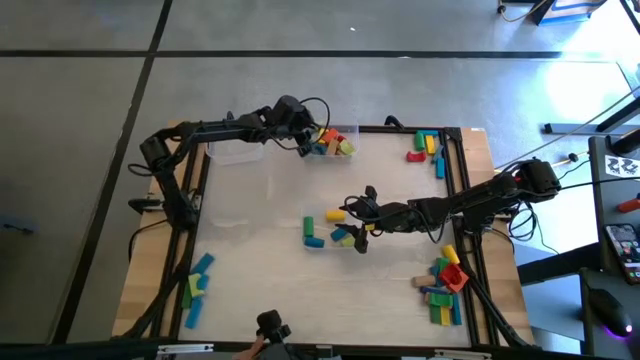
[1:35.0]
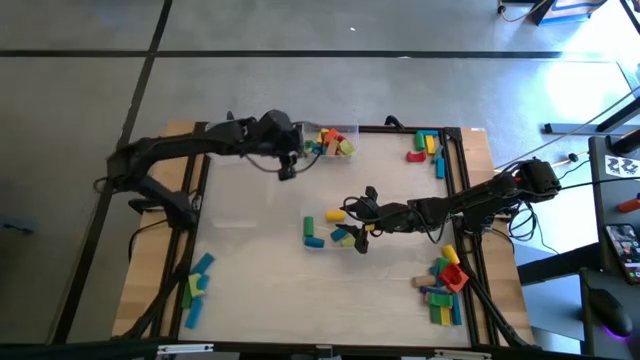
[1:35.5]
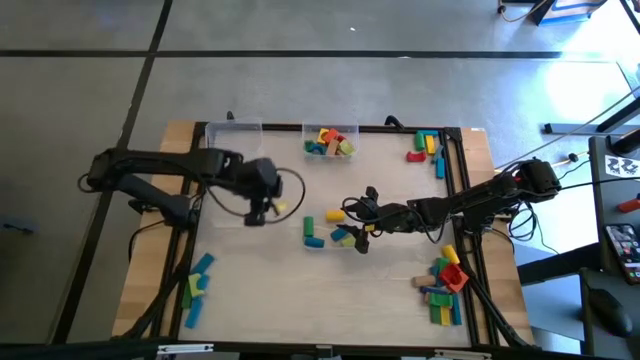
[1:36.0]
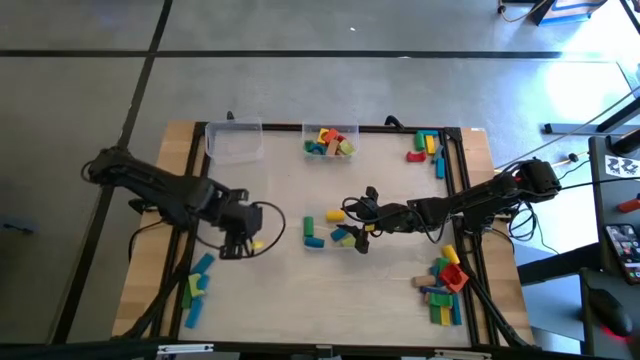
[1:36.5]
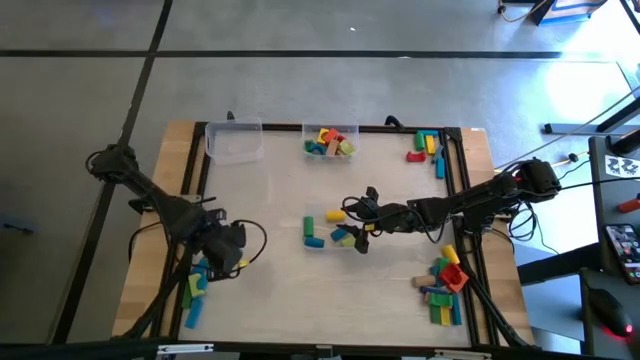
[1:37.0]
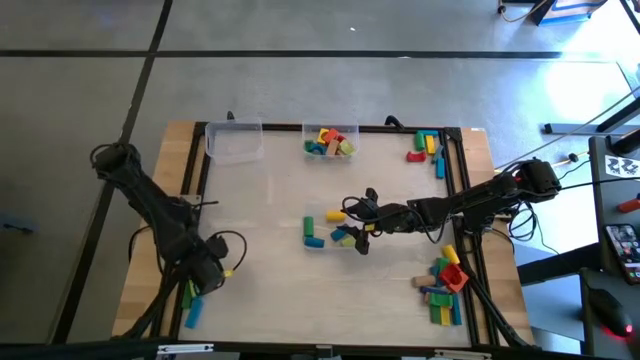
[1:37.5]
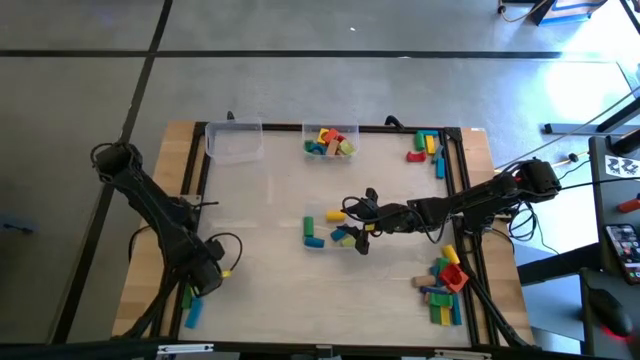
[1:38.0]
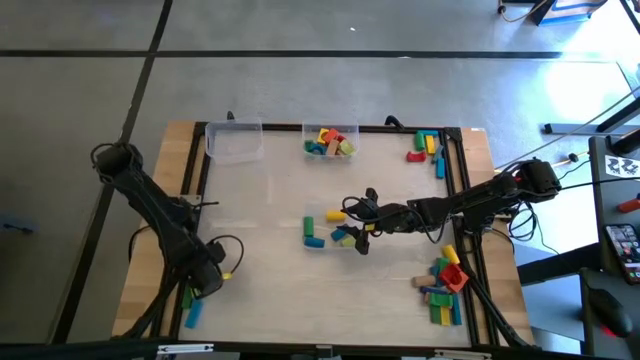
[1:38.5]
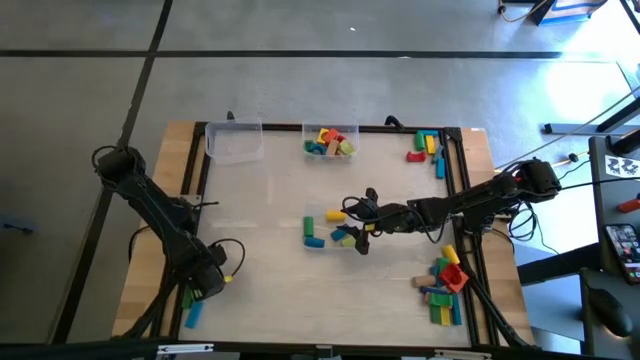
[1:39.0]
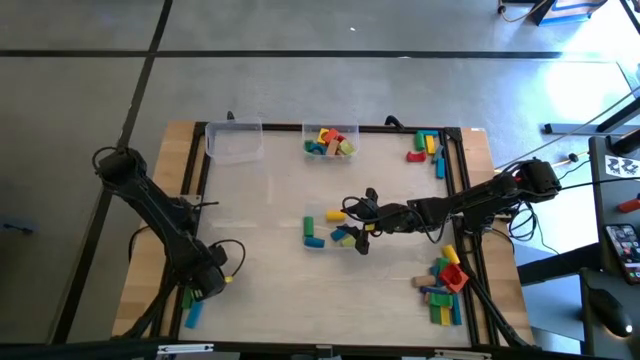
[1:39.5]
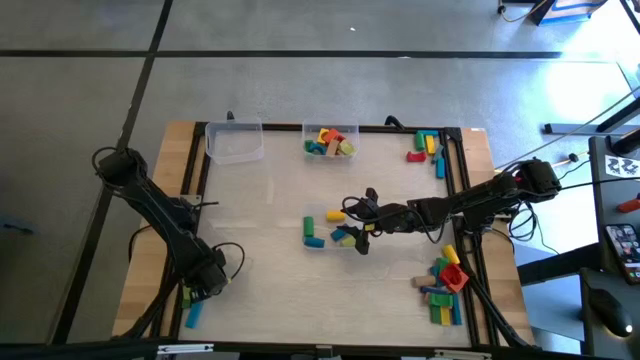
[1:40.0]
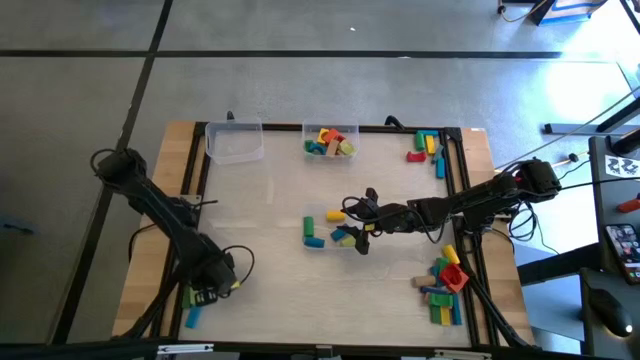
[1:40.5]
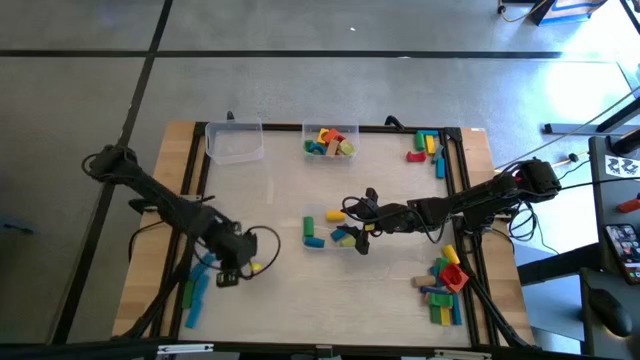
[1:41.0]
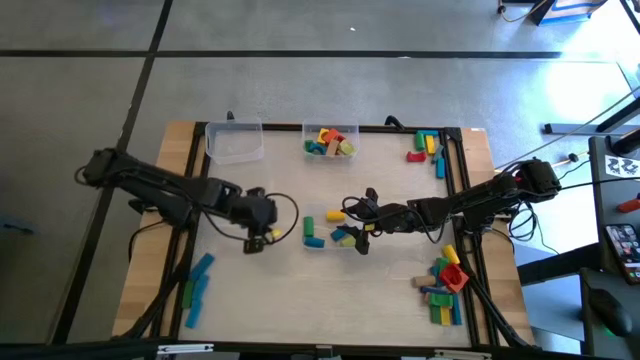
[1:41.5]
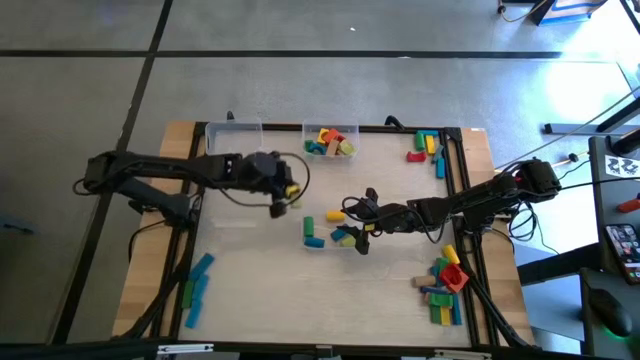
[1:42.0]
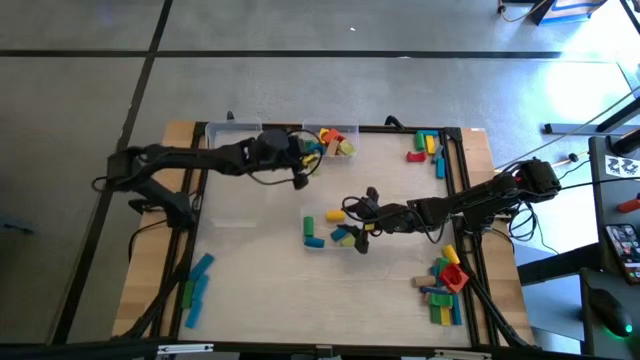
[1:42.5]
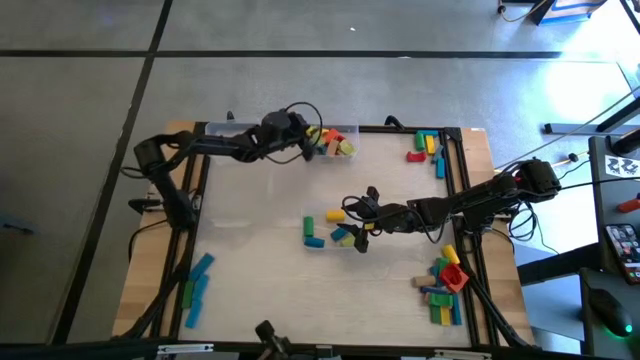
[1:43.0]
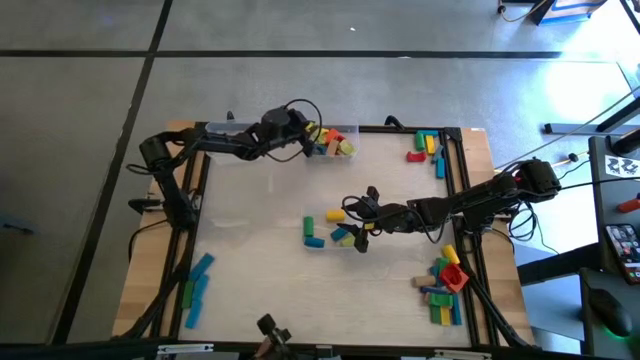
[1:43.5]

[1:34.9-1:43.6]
Task: Sort blocks by size
Put the light green arch block into the top right transparent bin

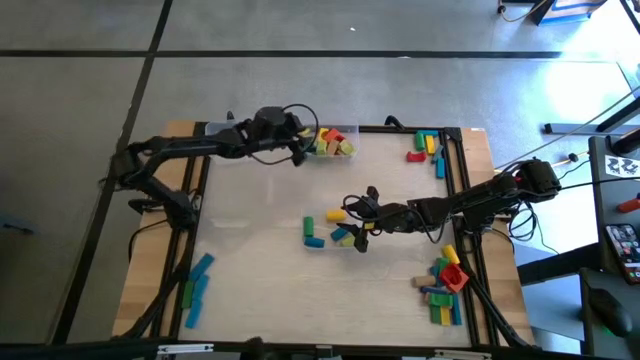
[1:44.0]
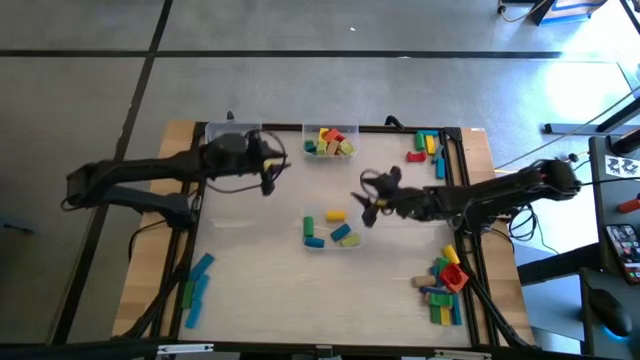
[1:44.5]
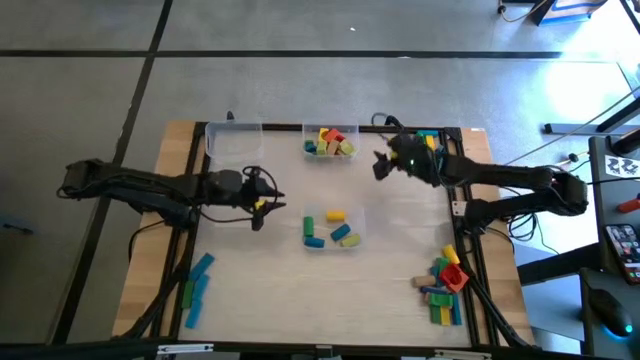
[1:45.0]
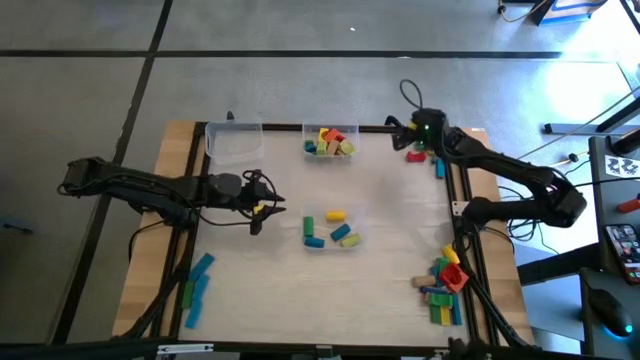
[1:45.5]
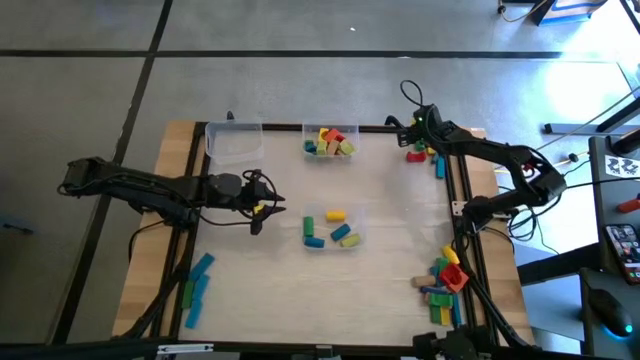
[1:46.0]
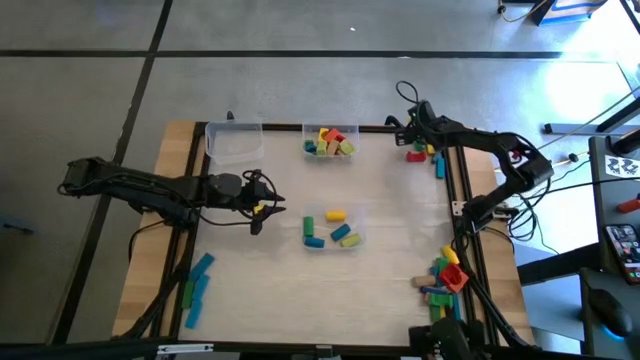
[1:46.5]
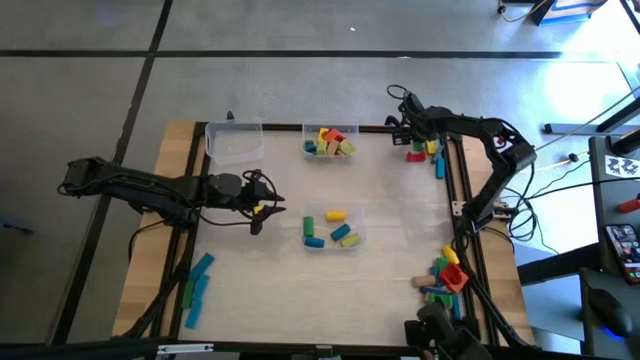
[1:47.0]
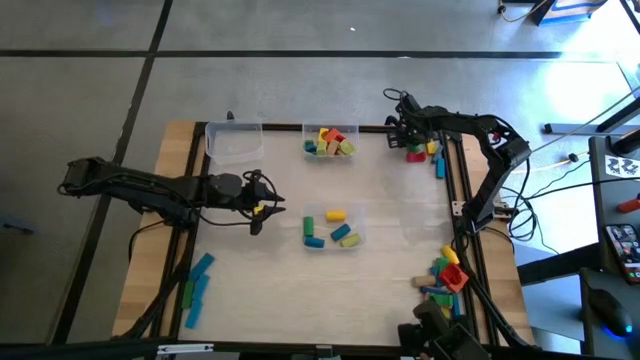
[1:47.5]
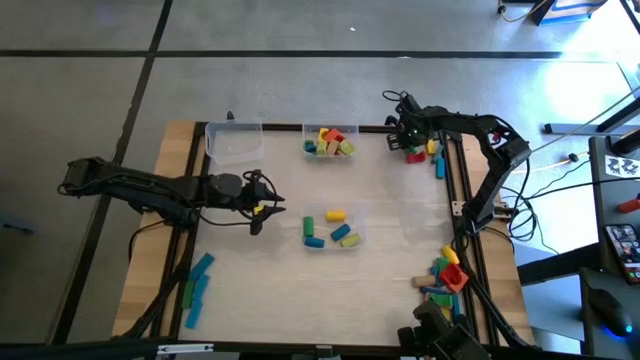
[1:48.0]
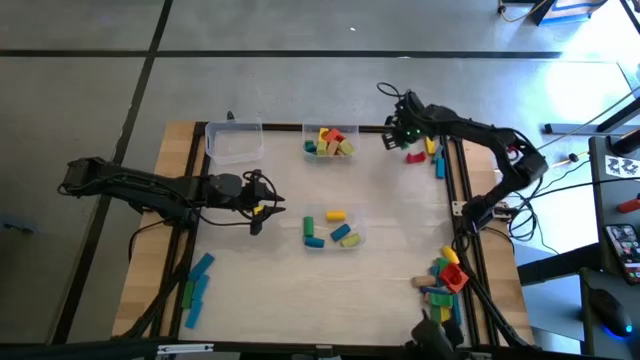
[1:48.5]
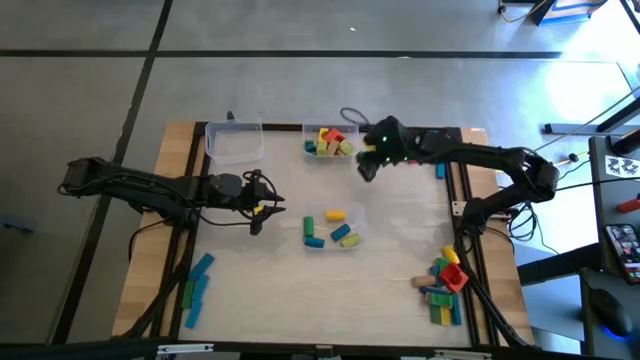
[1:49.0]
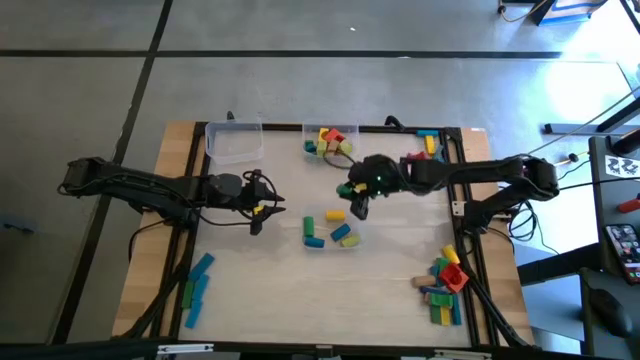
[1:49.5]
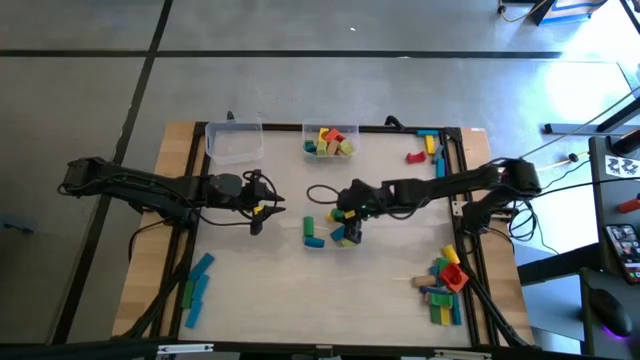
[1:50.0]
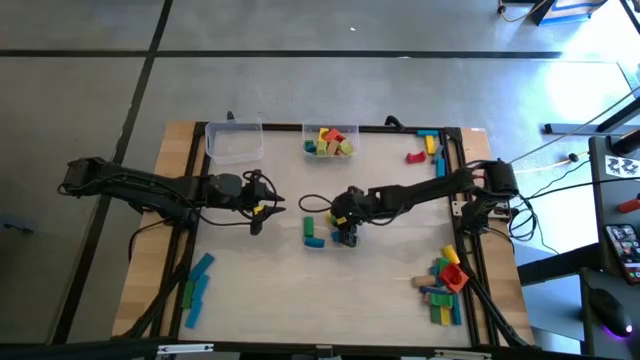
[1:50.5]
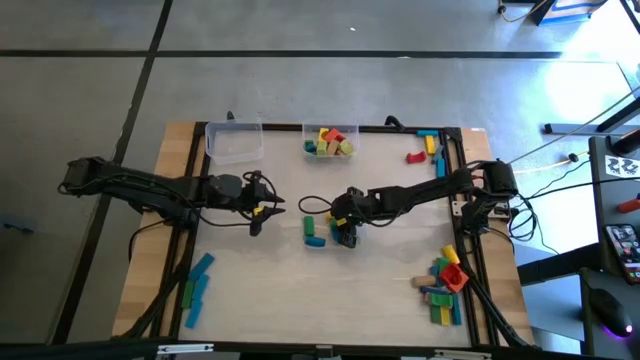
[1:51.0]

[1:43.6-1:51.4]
Put the green cylindrical block into the bottom transparent bin

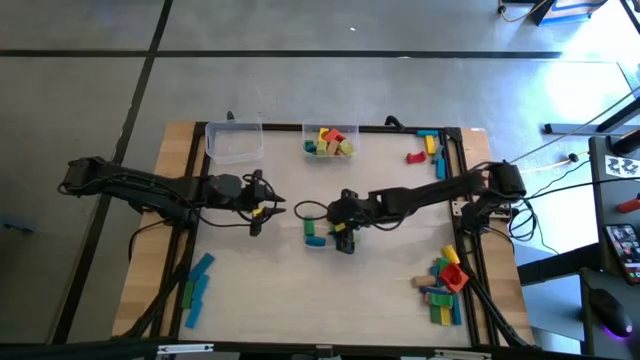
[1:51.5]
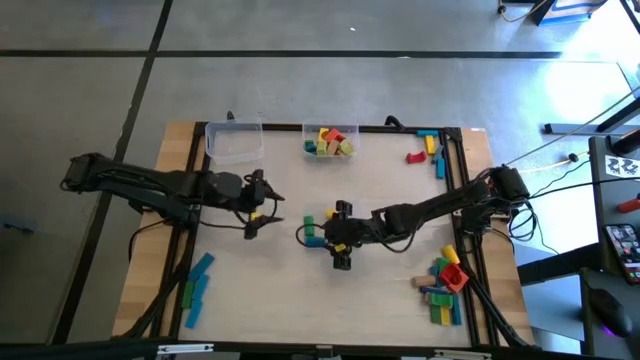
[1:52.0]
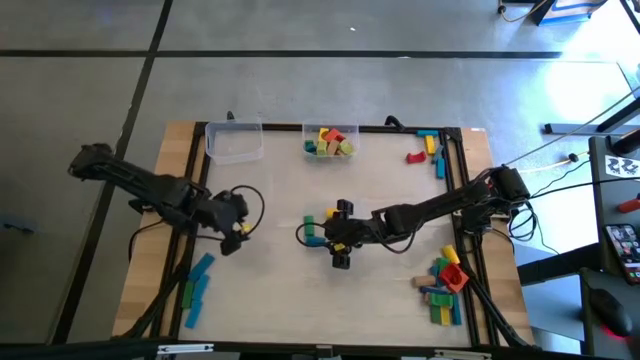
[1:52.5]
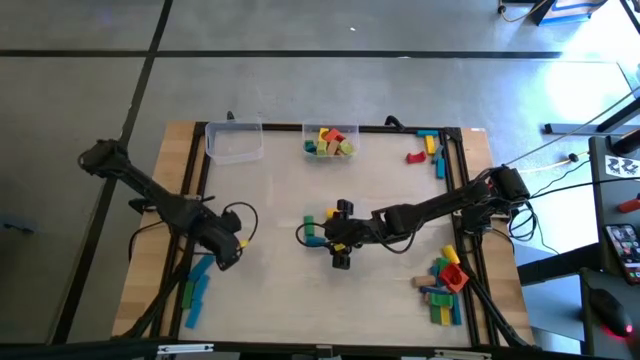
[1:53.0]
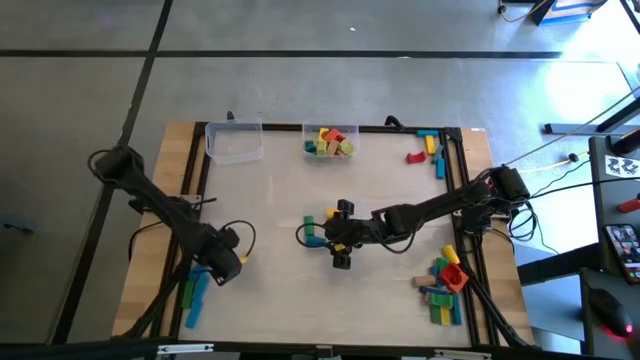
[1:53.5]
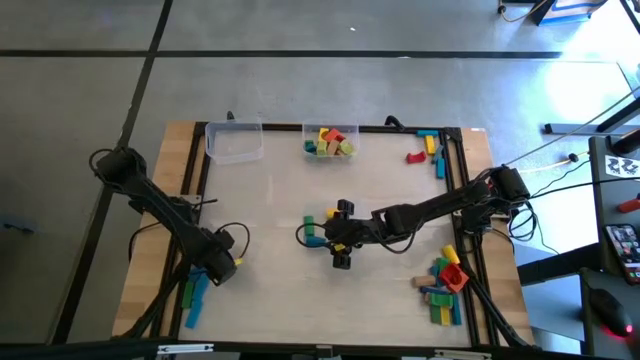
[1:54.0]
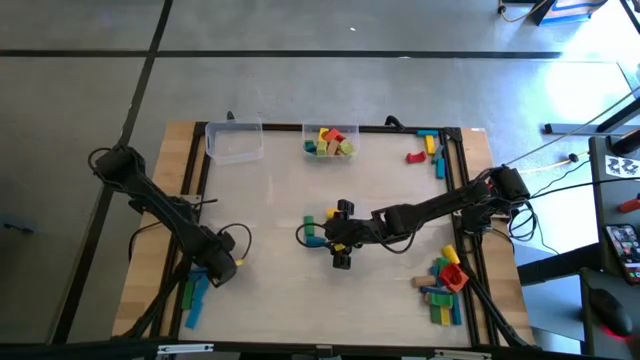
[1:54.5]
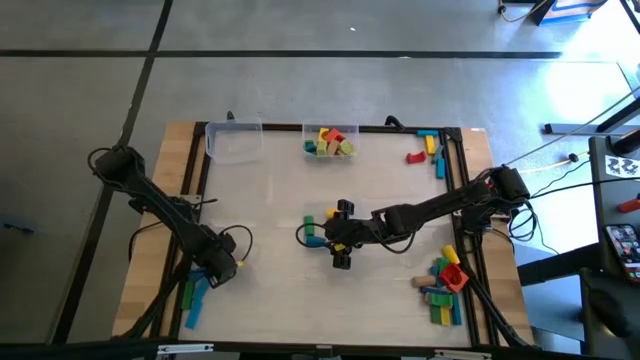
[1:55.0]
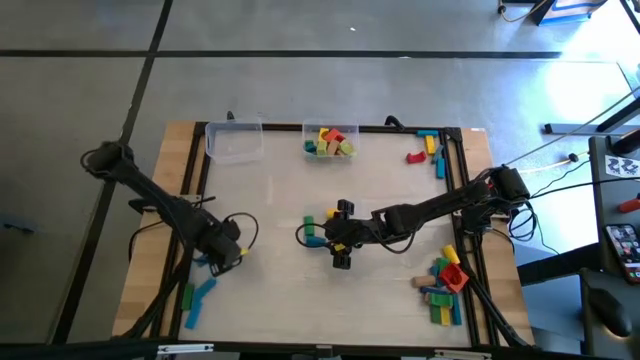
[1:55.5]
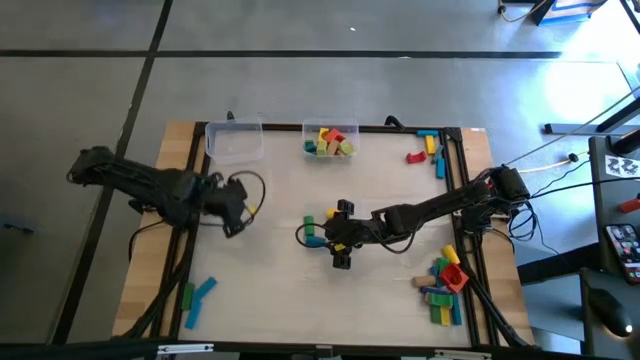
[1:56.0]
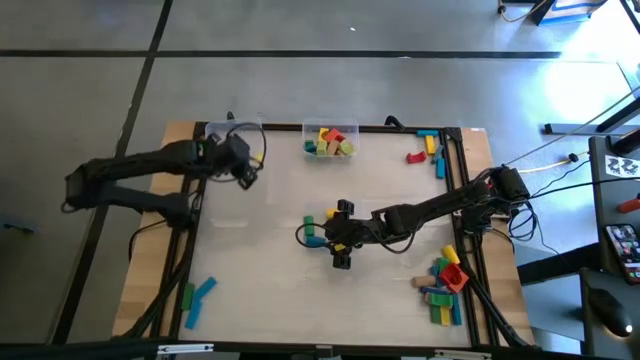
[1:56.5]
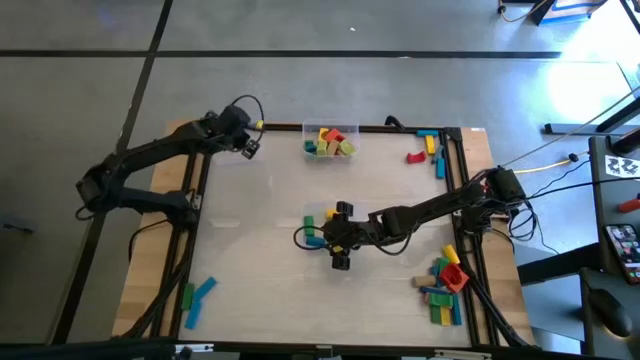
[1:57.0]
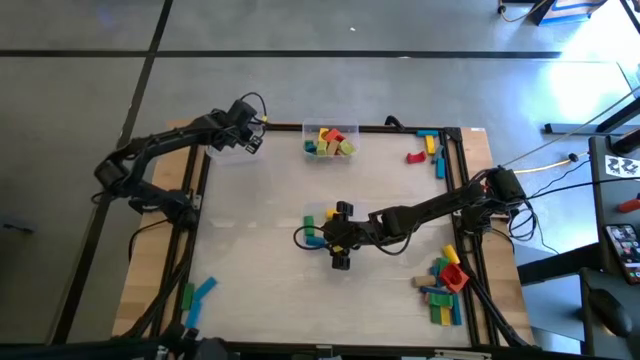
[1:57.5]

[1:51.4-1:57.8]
Put the blue rectangular block into the top left transparent bin
